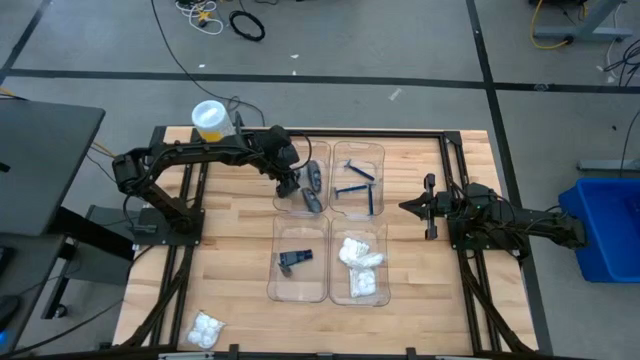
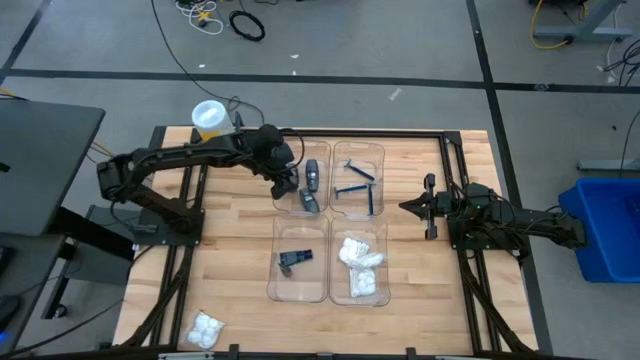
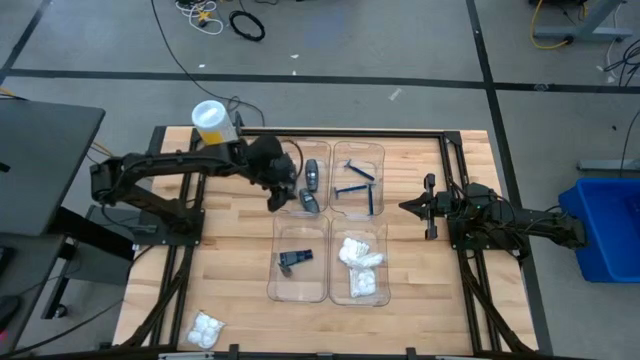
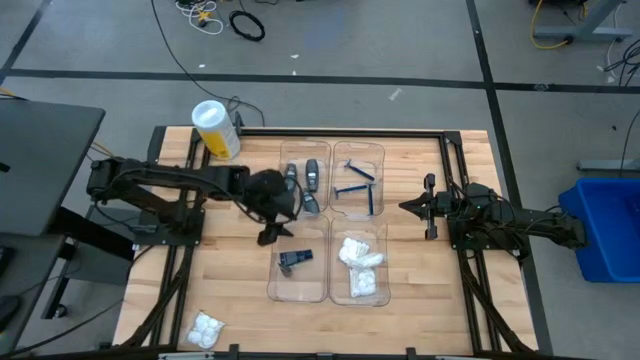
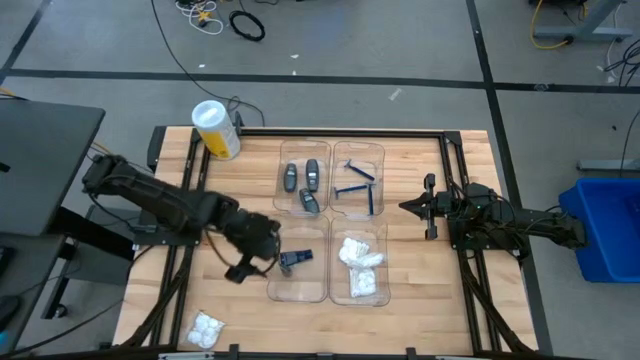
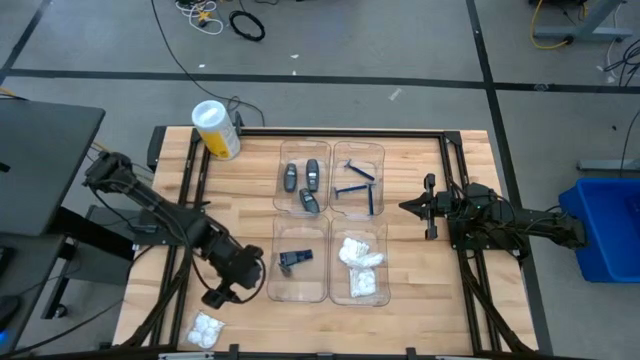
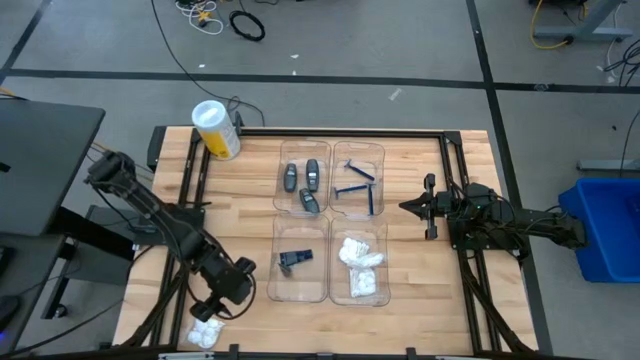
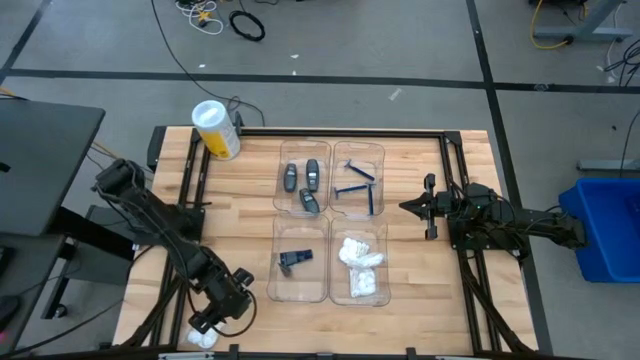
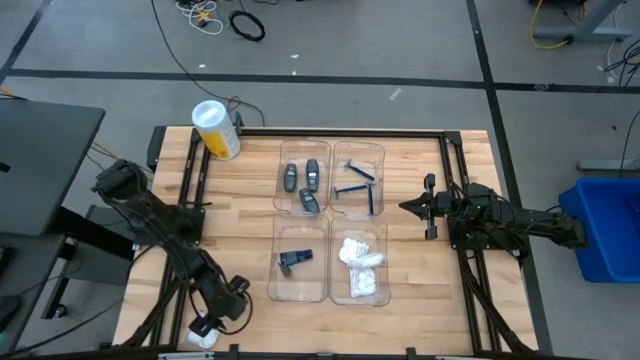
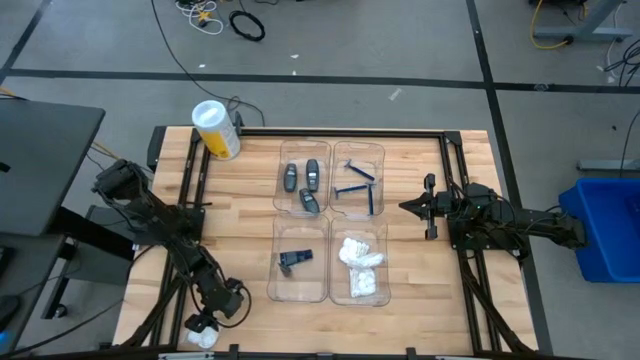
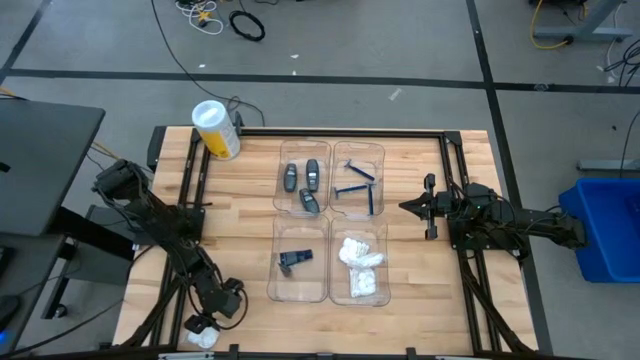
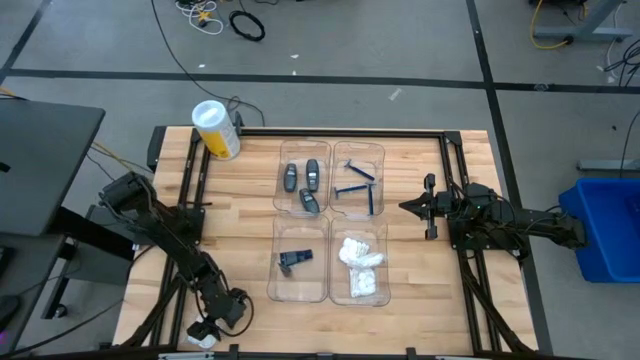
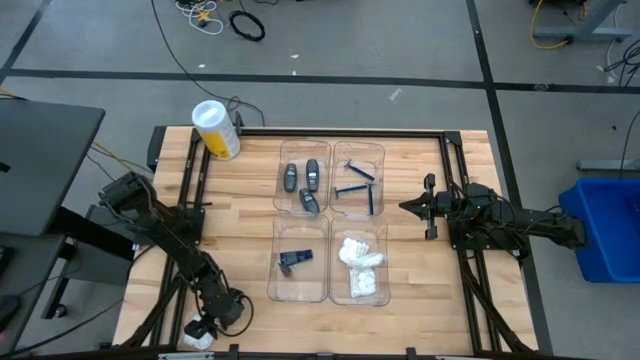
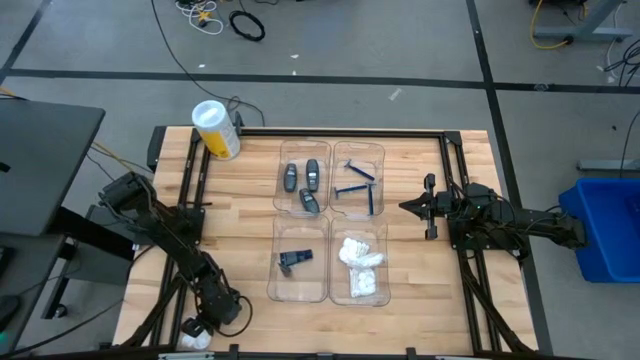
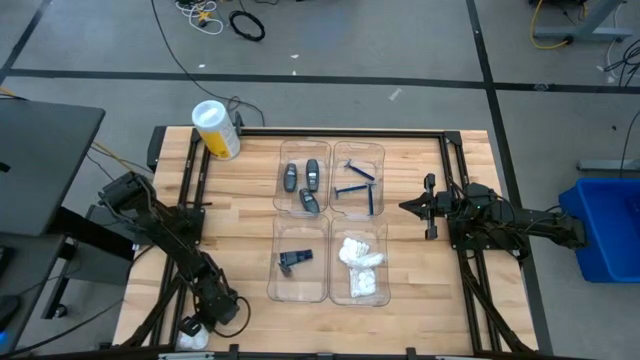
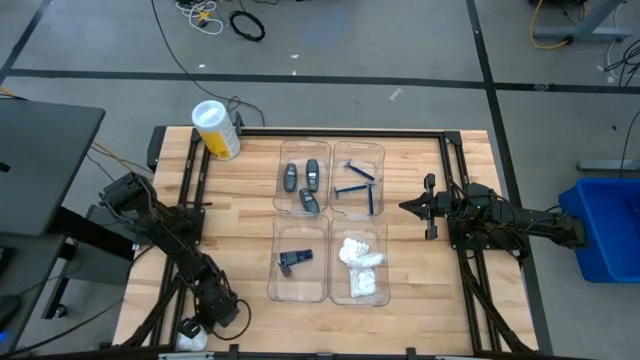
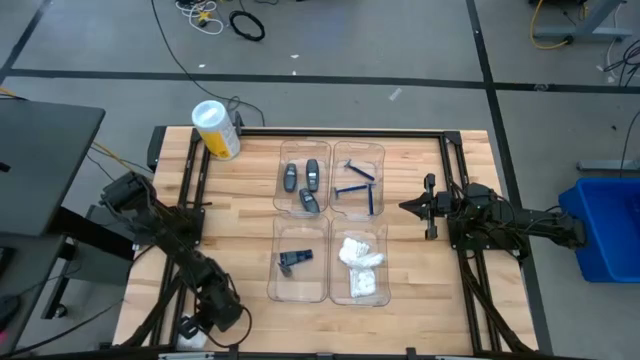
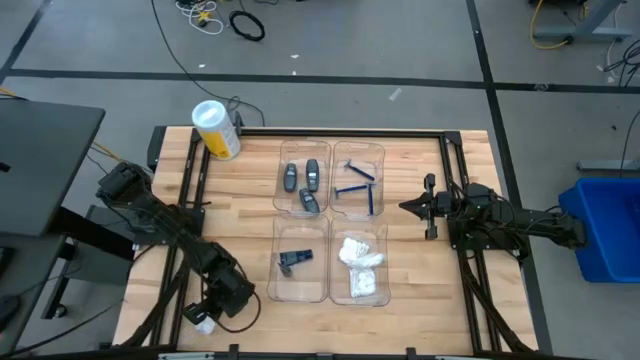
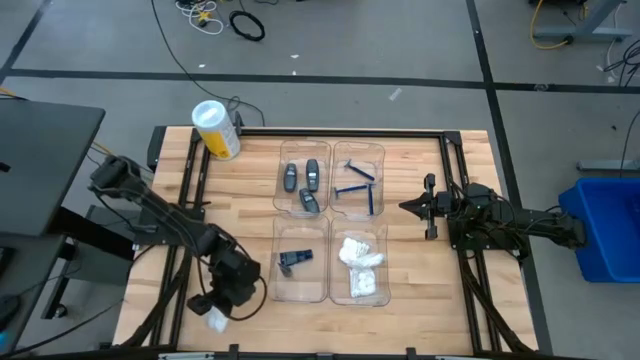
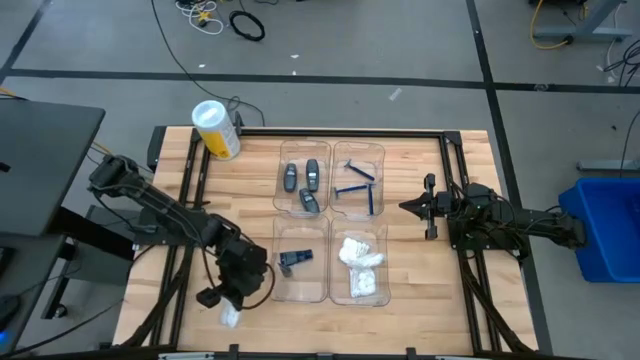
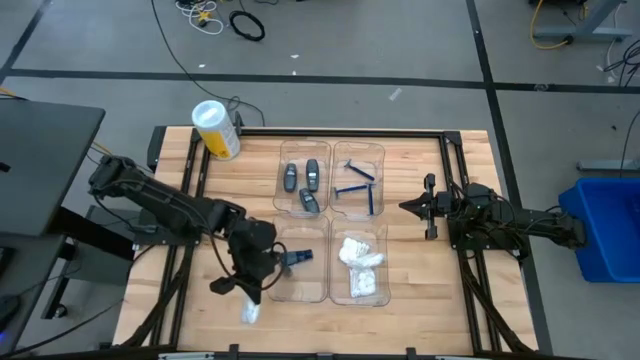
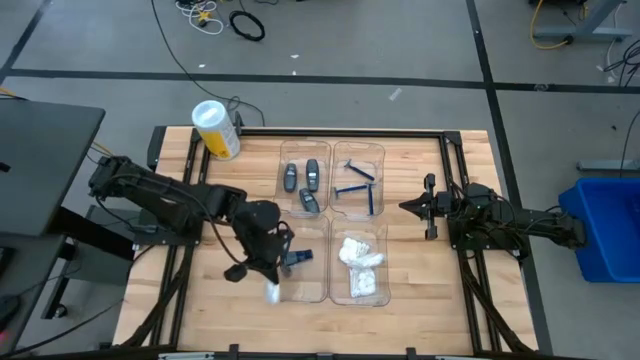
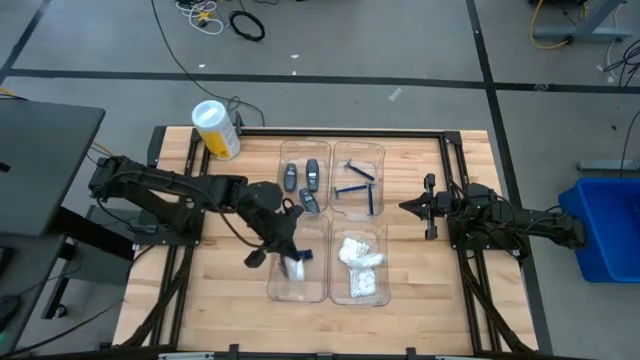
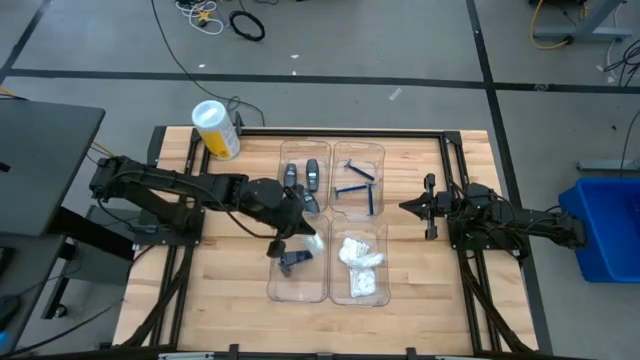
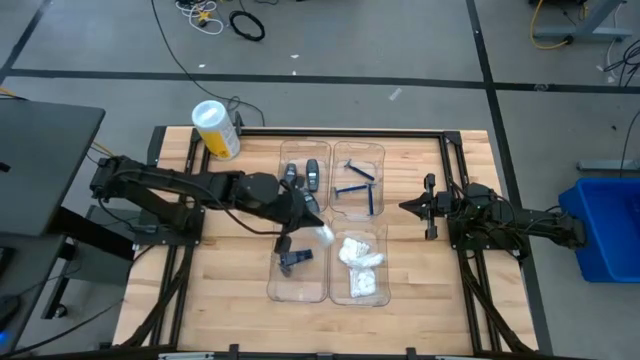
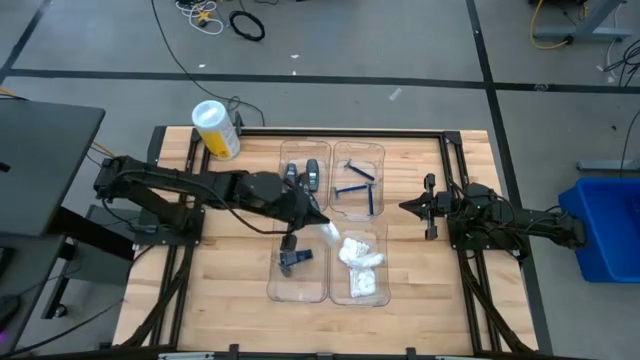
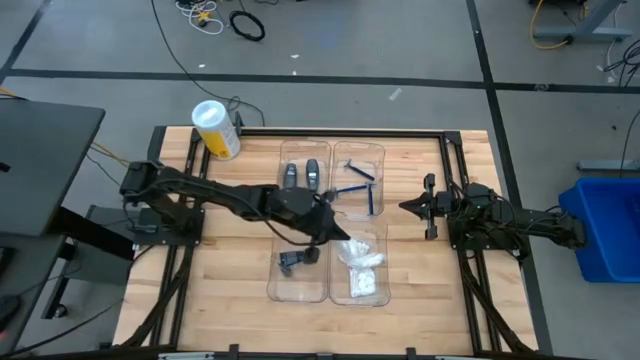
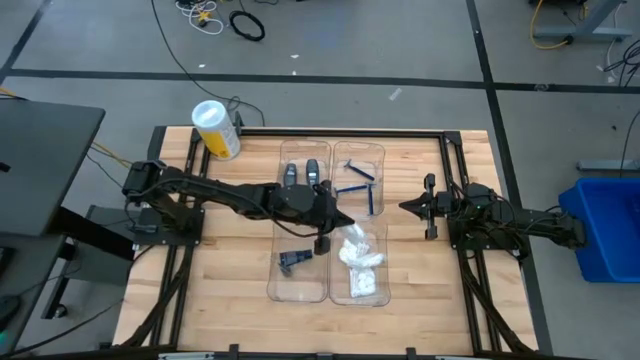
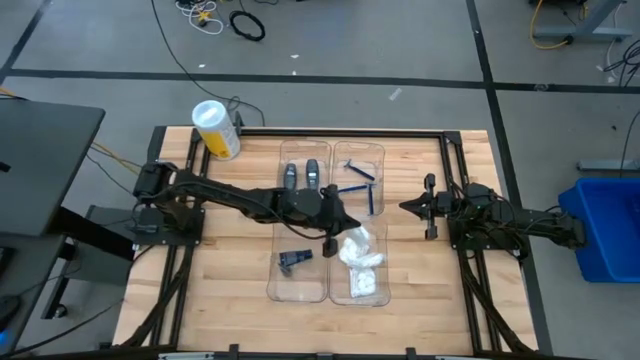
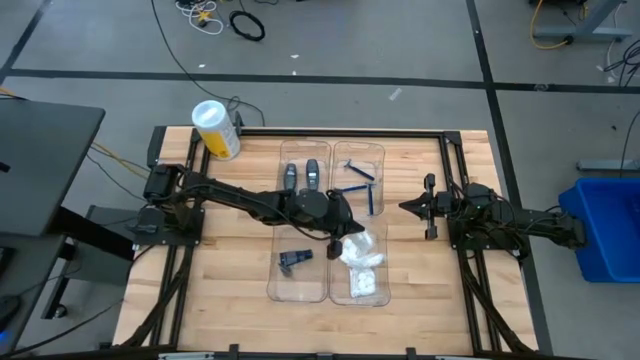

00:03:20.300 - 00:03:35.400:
Task: Pick & Place Travel size toiletries
Put the cotton pack into the bottom right transparent bin

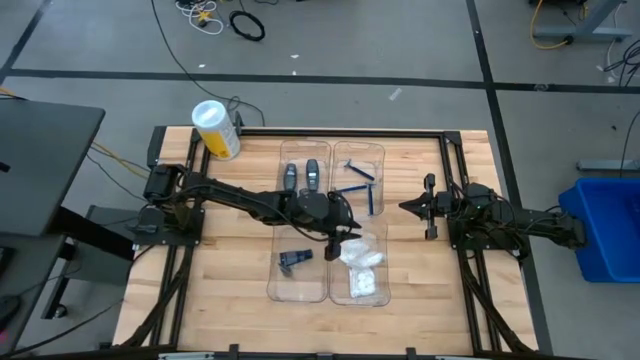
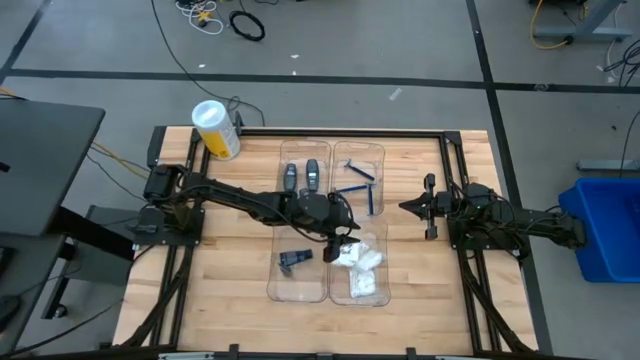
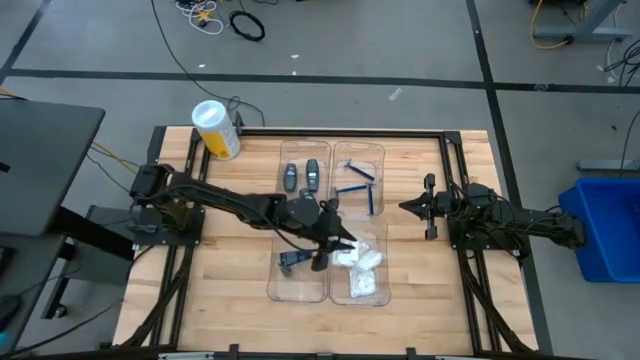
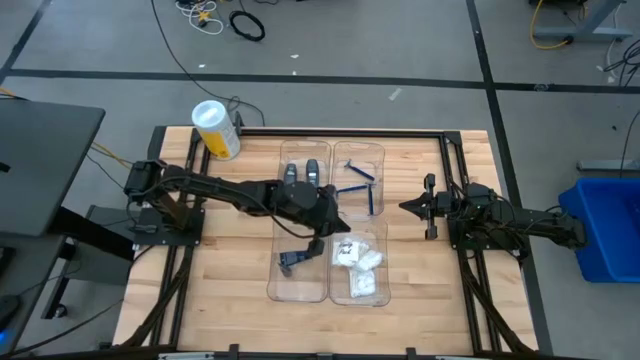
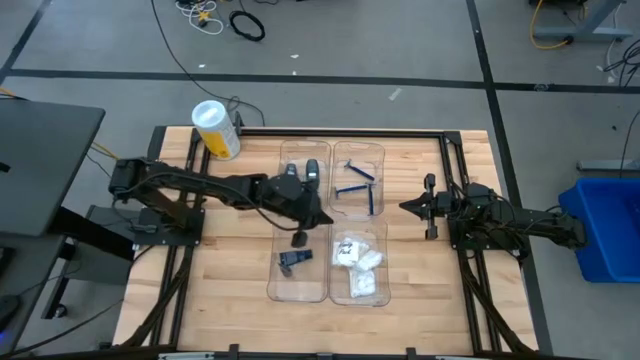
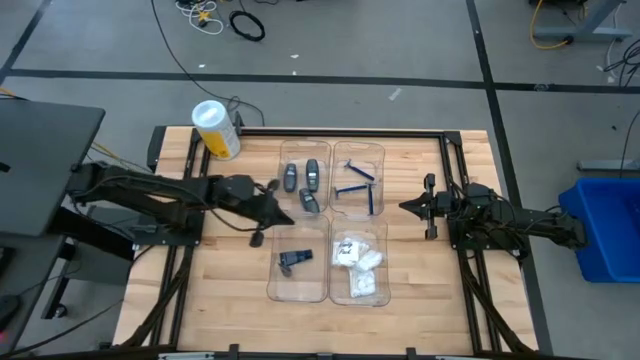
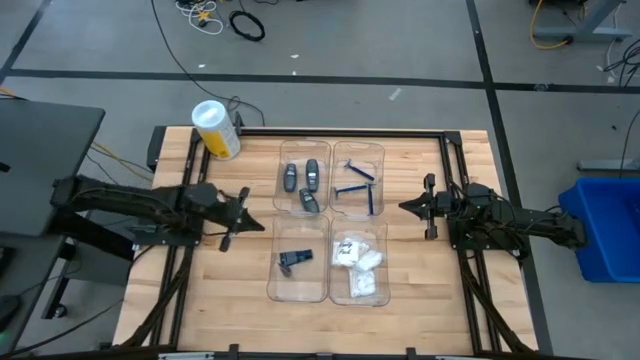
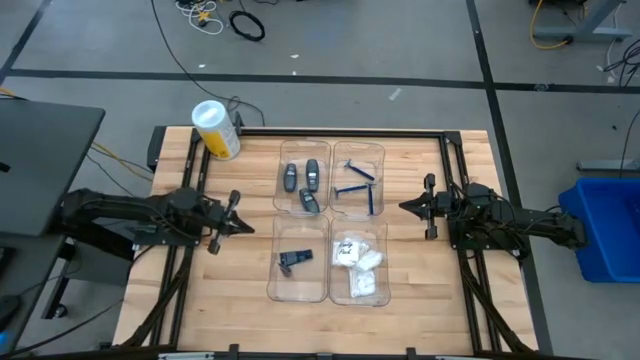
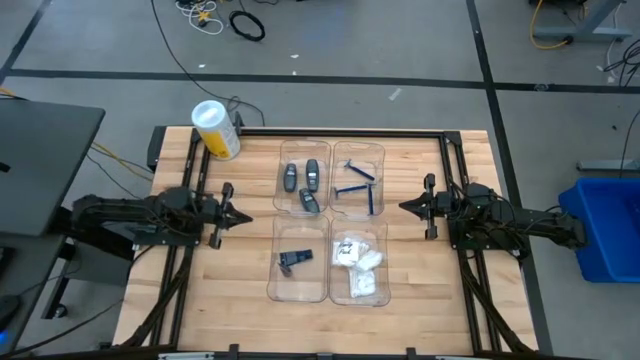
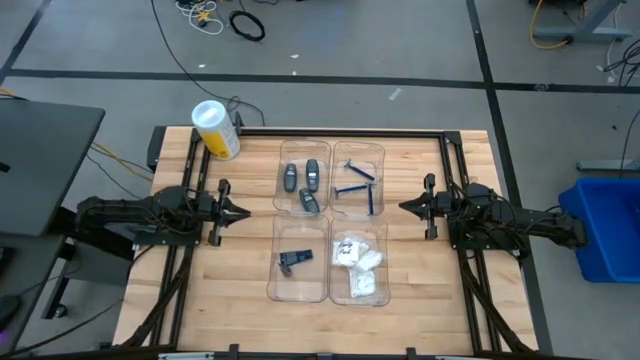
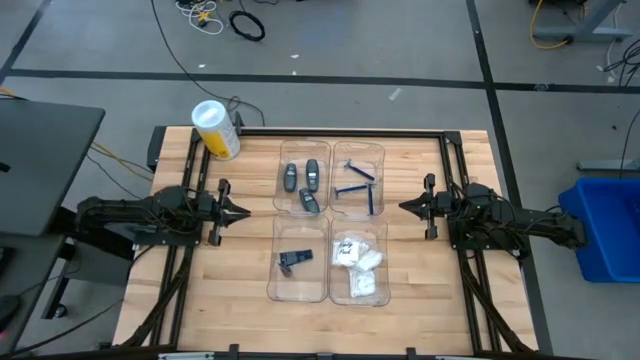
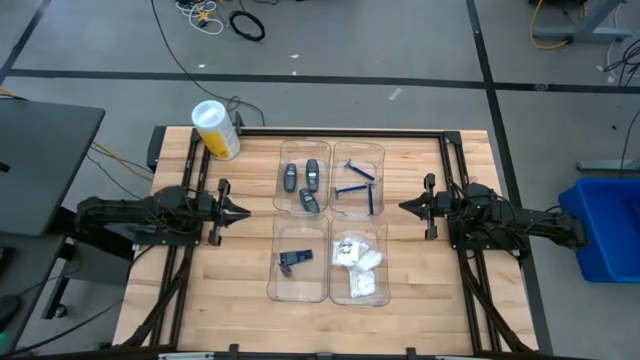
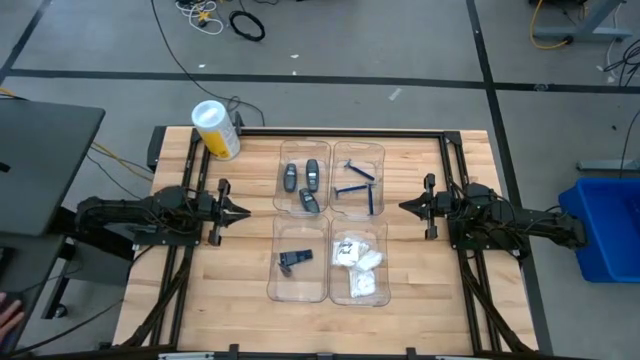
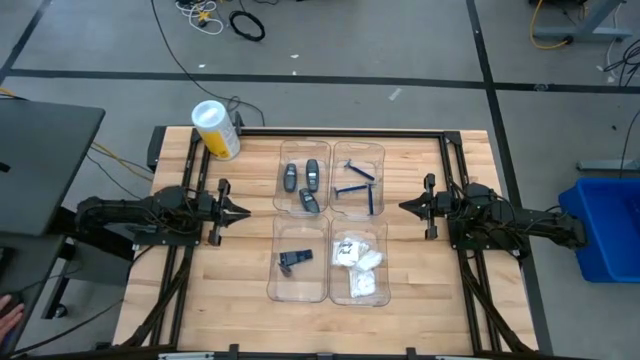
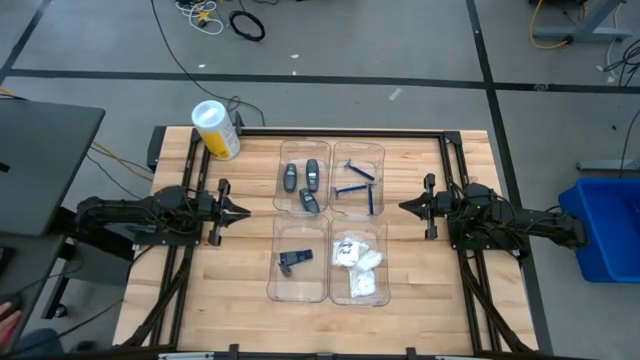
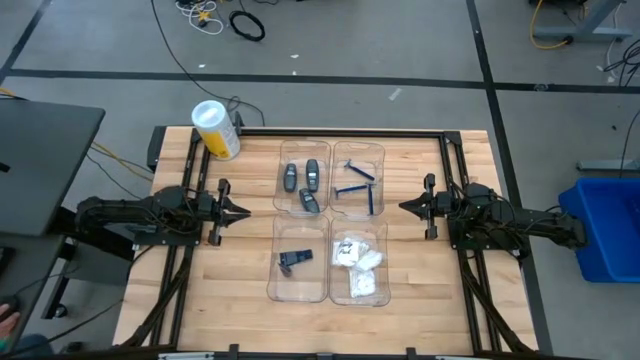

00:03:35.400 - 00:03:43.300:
Return to Home Position
